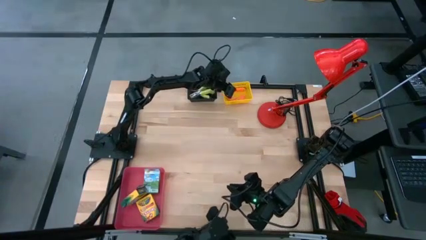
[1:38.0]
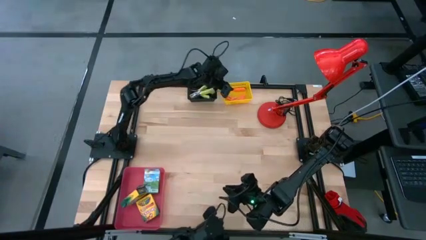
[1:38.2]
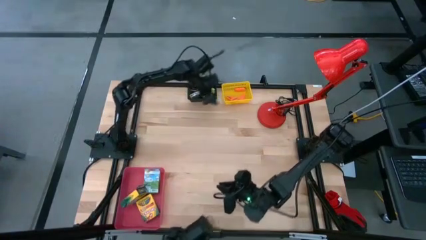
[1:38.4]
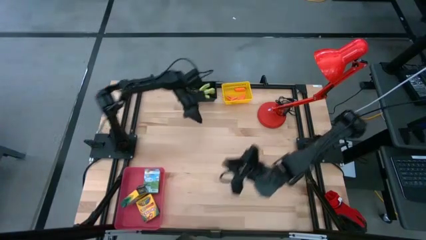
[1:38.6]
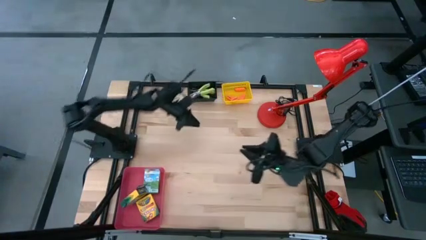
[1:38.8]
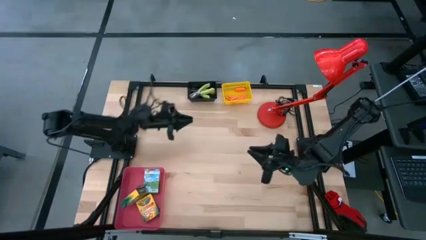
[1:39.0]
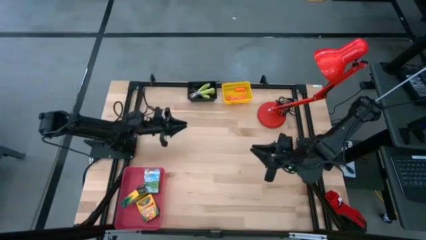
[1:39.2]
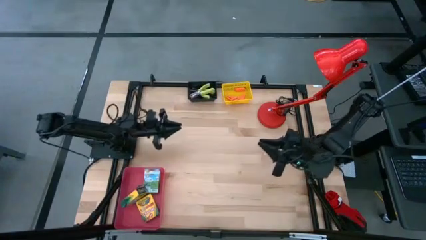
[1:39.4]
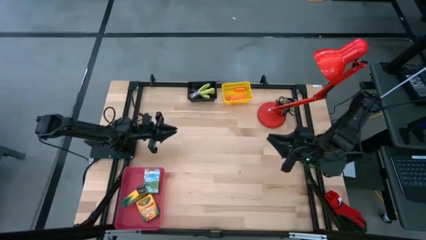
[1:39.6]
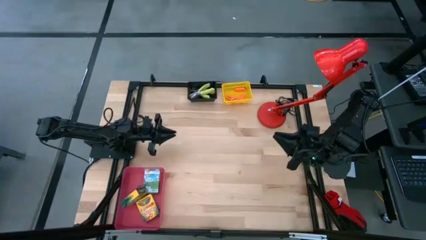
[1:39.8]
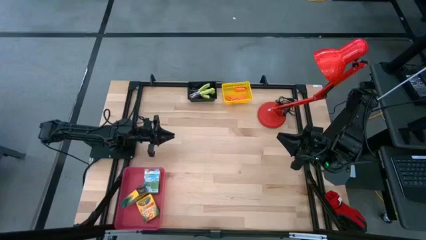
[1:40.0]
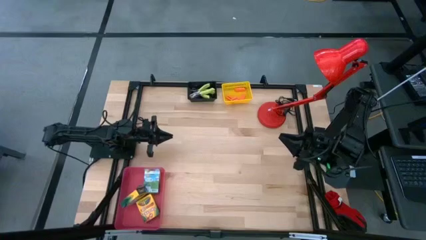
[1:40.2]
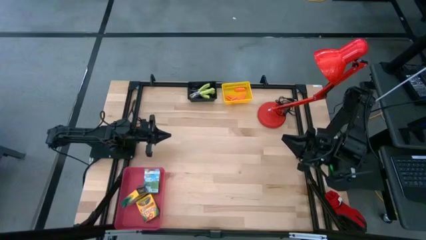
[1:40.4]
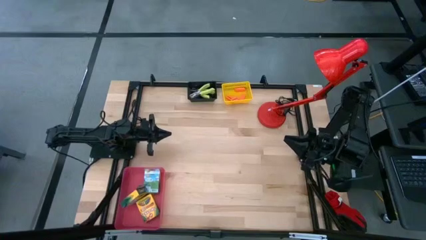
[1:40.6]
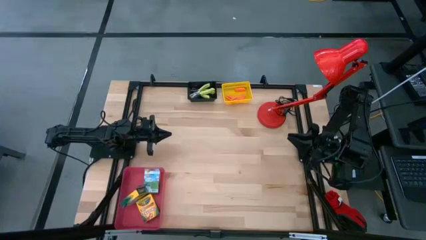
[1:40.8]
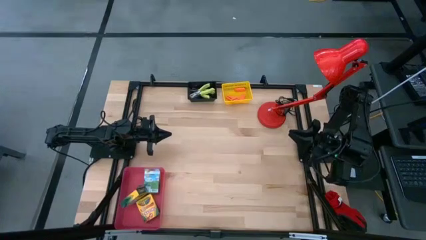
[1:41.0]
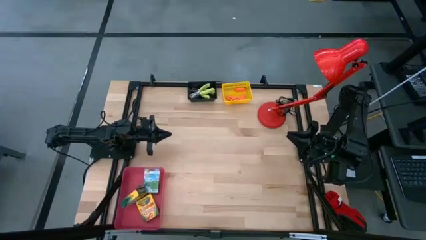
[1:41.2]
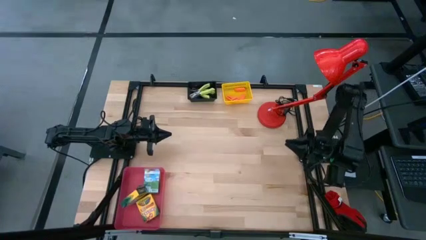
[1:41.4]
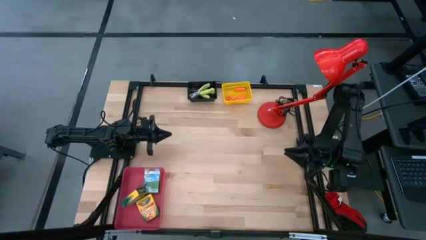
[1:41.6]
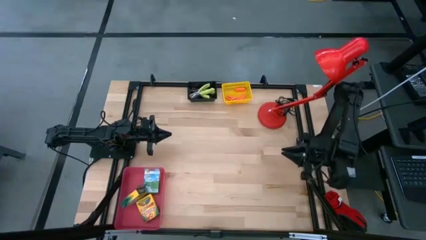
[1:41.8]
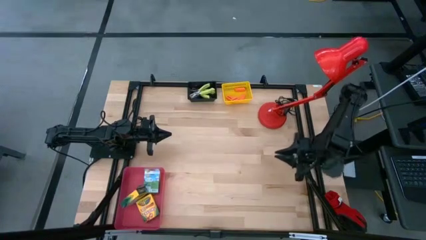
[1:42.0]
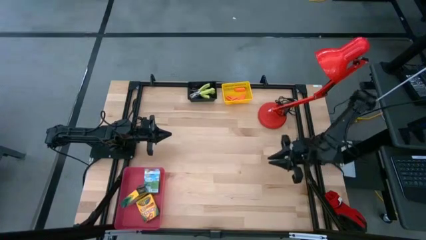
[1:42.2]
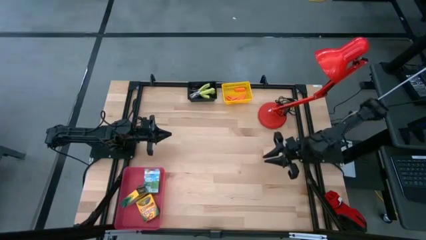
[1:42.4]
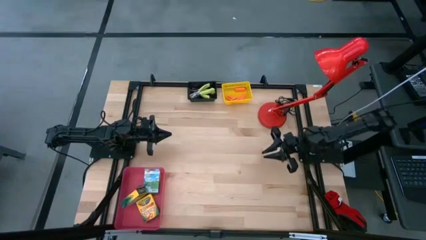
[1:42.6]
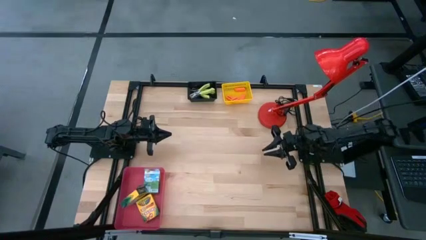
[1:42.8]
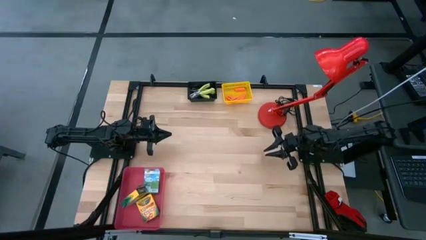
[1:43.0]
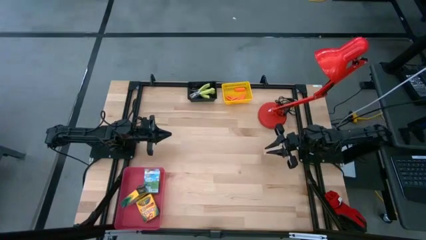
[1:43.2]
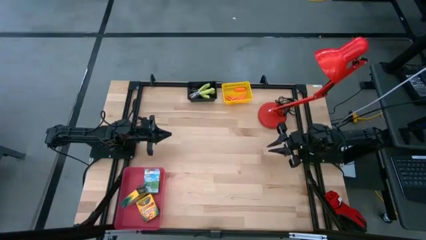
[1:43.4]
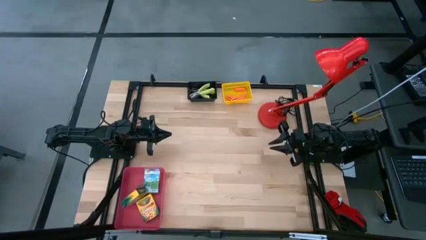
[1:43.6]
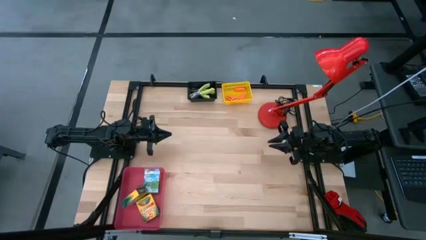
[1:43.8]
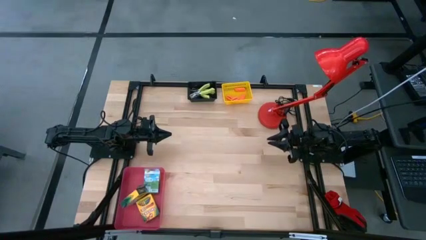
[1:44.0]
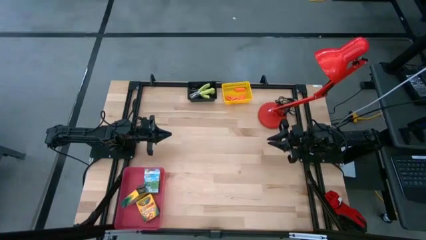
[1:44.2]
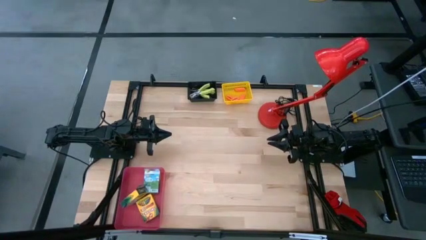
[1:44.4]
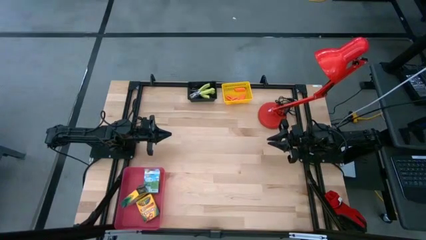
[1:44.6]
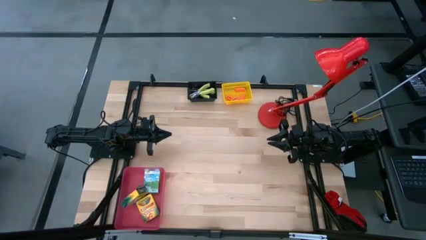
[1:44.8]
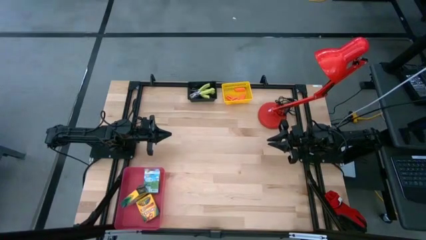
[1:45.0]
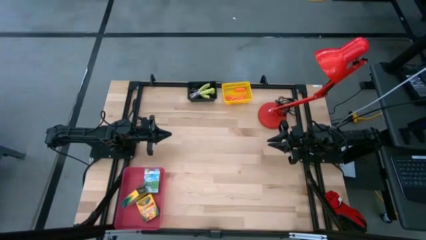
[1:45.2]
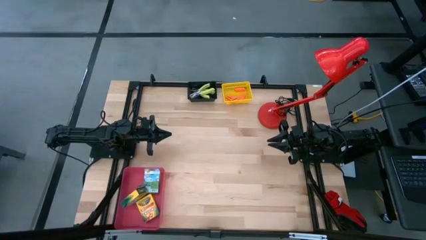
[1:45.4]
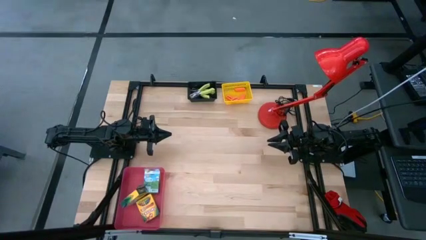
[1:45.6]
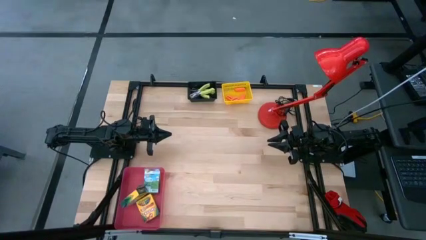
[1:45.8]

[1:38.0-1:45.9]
Task: Pick & Place School Supplies
Return to Home Position

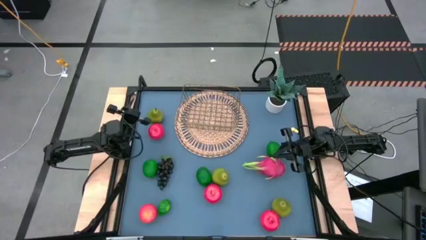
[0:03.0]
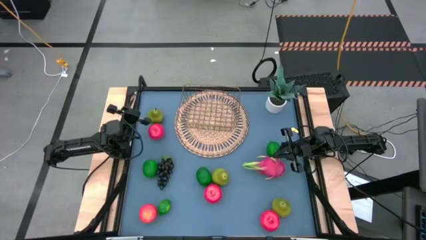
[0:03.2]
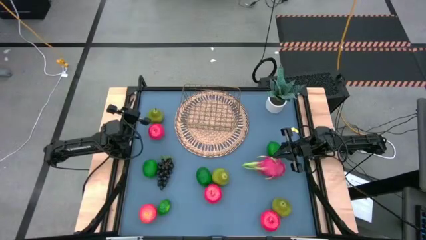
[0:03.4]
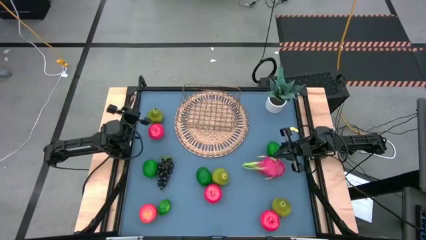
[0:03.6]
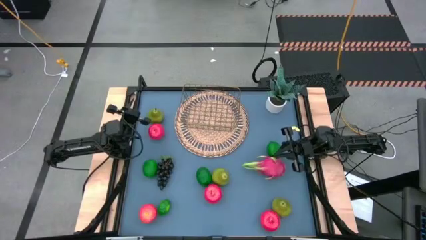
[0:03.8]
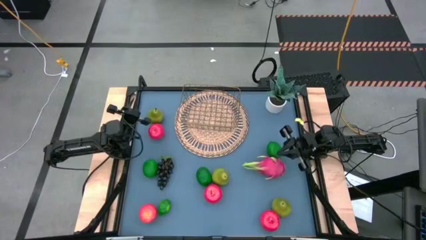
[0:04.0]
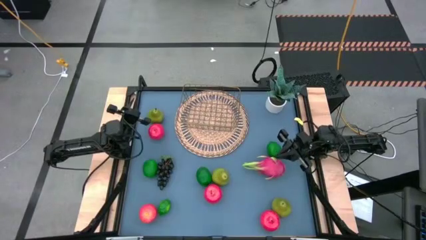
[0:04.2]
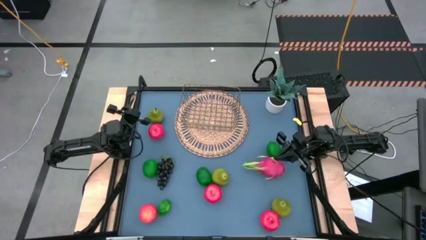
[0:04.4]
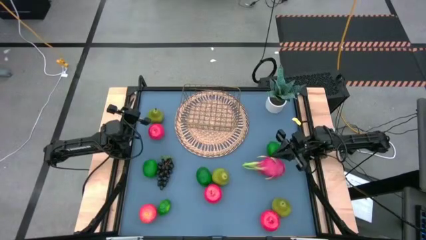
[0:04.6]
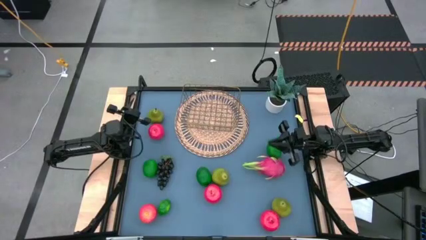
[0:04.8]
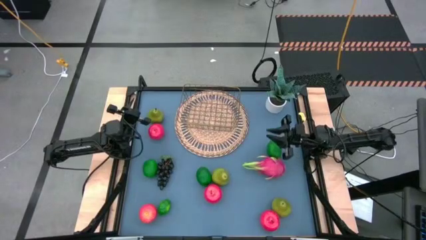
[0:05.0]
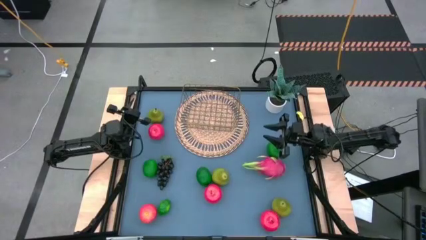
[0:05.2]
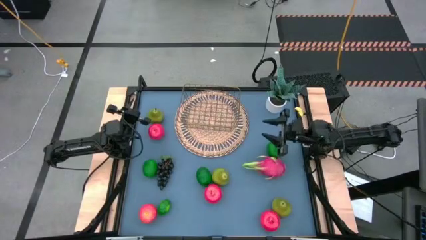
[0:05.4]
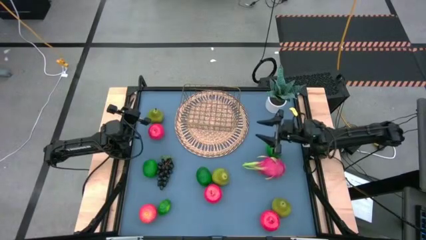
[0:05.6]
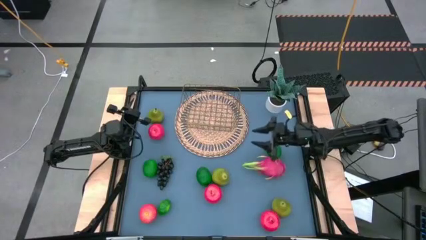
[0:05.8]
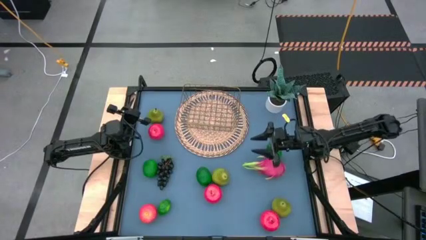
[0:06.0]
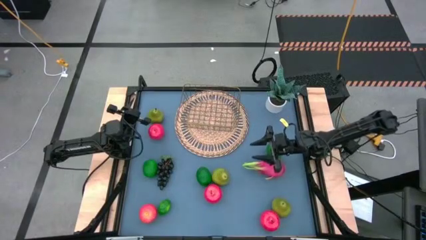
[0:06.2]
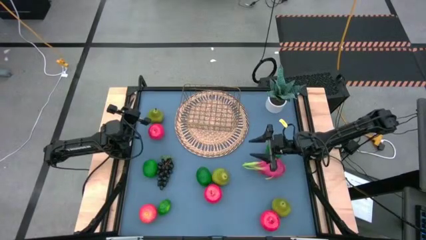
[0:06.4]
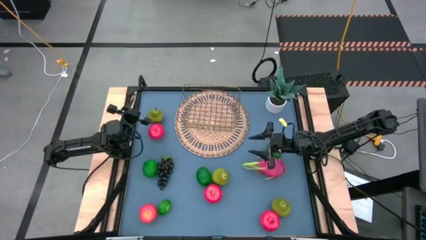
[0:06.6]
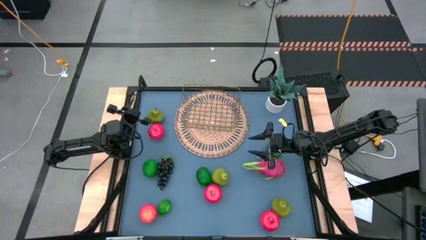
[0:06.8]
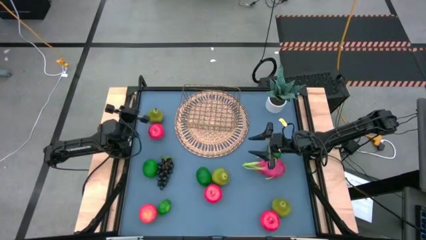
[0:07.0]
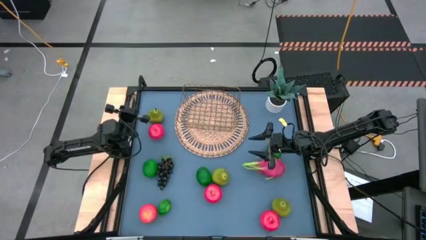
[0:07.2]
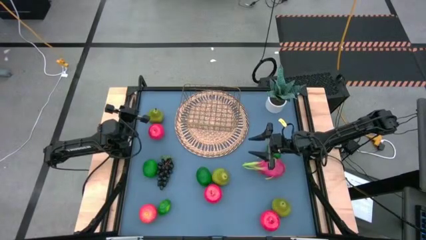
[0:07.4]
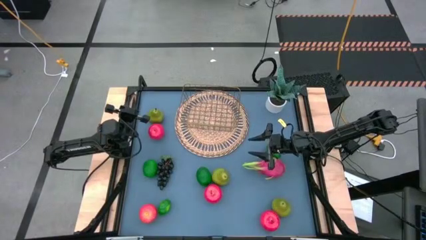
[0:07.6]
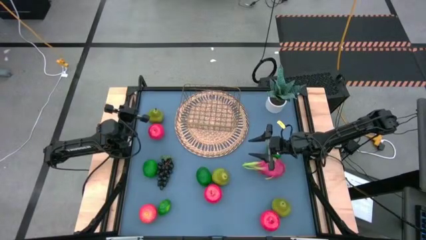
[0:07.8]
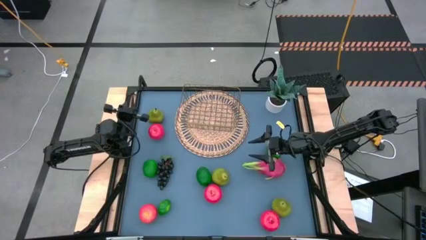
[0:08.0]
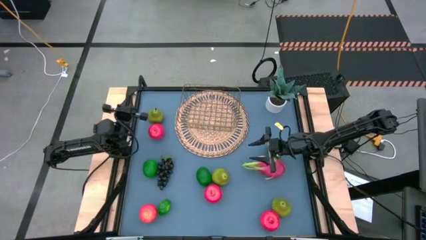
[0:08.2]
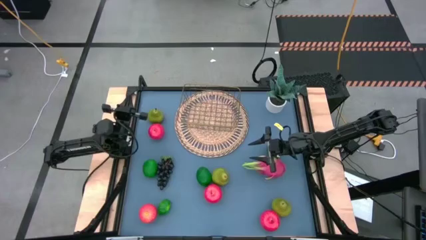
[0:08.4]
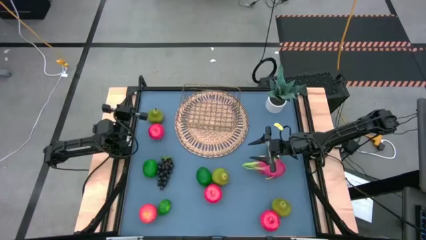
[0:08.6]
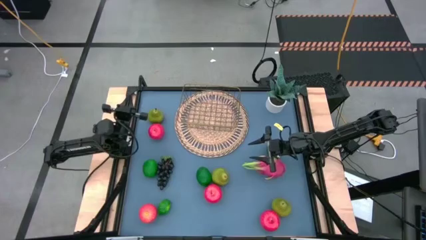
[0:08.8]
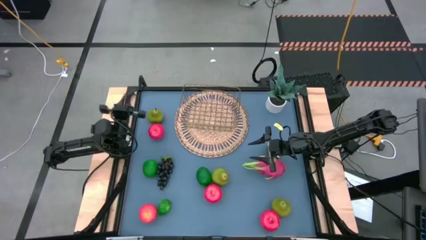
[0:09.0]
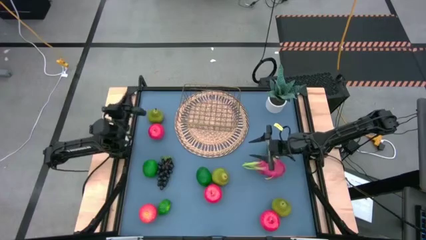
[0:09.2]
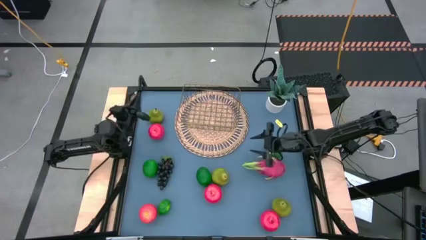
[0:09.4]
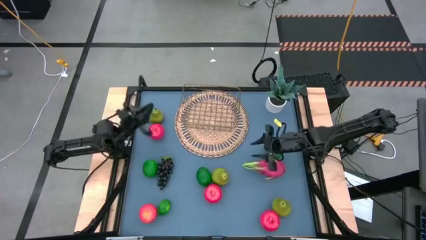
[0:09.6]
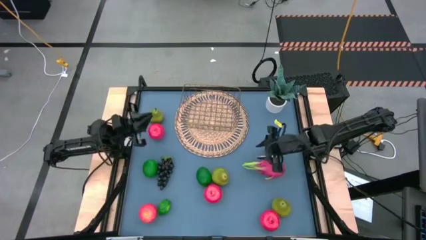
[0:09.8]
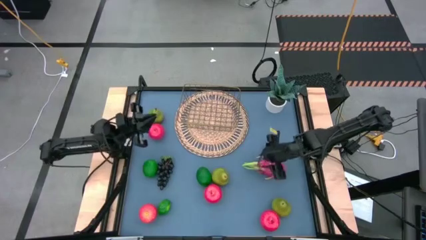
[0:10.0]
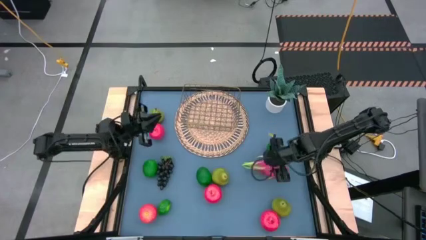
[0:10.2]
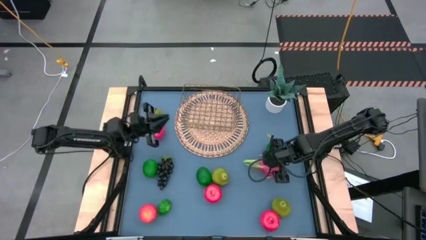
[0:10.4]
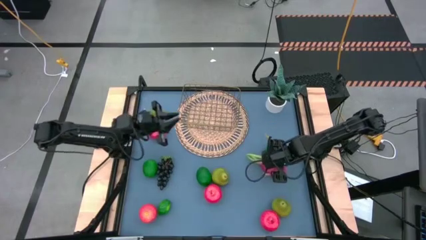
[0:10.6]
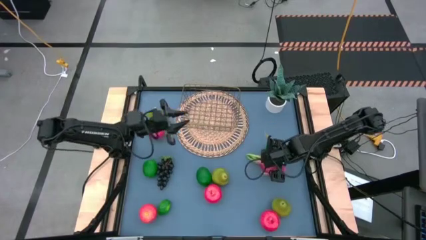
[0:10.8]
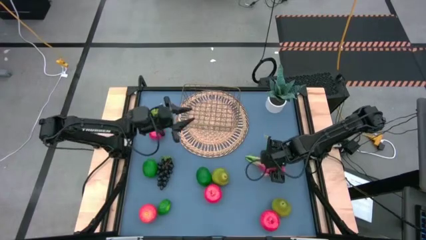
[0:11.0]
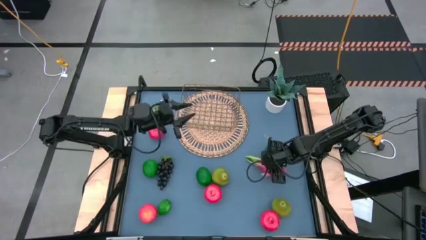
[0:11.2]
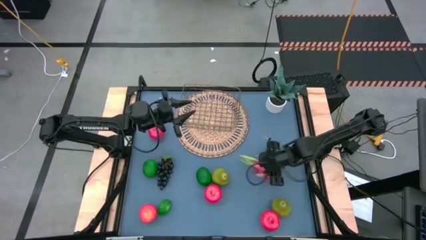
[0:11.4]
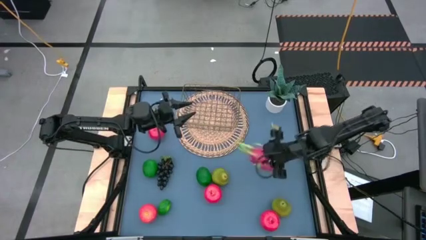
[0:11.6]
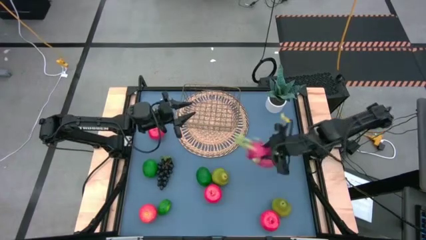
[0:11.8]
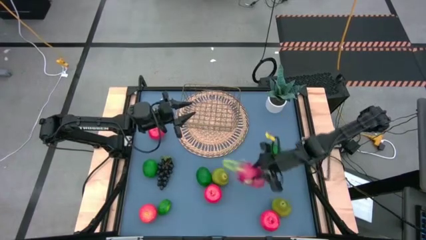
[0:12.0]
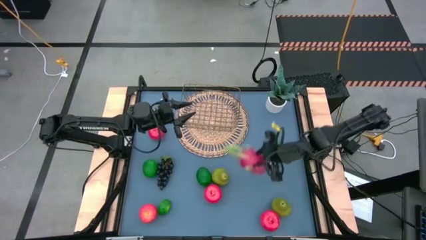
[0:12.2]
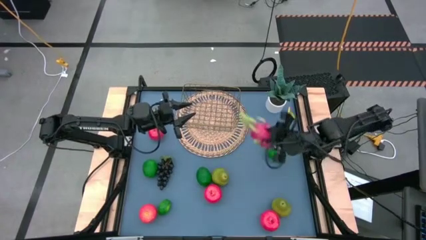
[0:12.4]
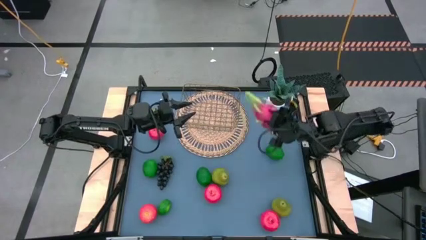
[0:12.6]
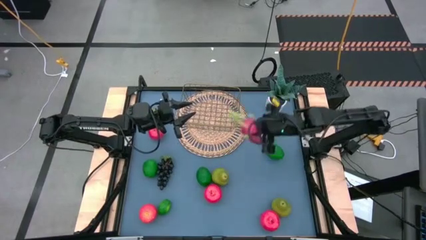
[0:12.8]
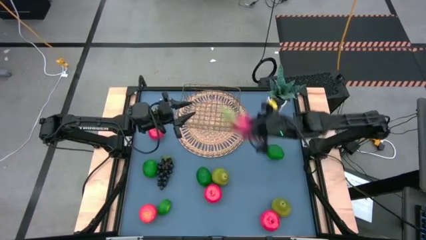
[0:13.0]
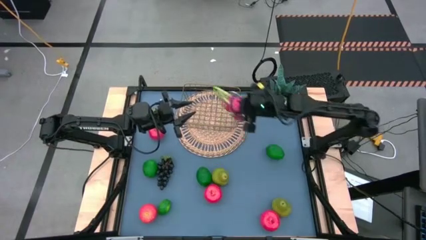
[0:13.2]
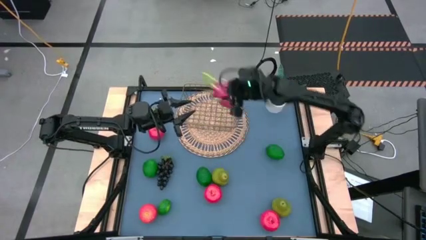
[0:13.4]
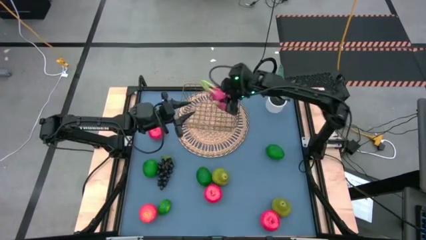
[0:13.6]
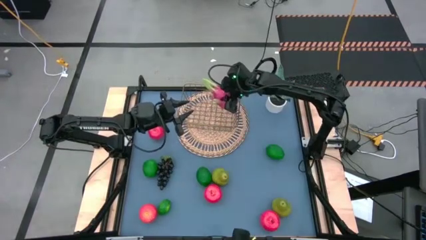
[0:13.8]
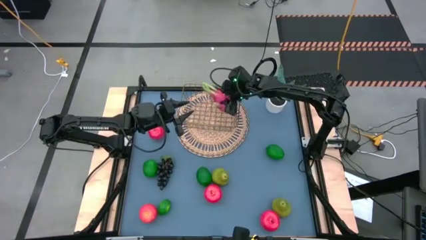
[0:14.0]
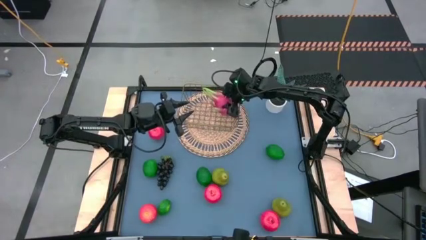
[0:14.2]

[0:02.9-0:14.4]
Task: Build produce basket
Put the pink dragon fruit into the gold wire basket
